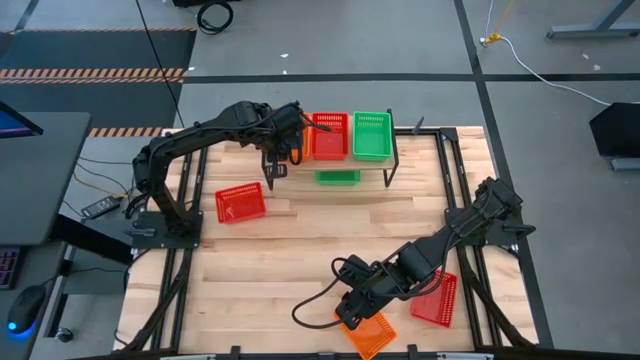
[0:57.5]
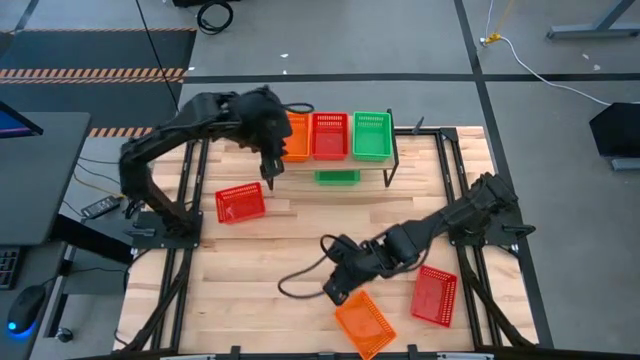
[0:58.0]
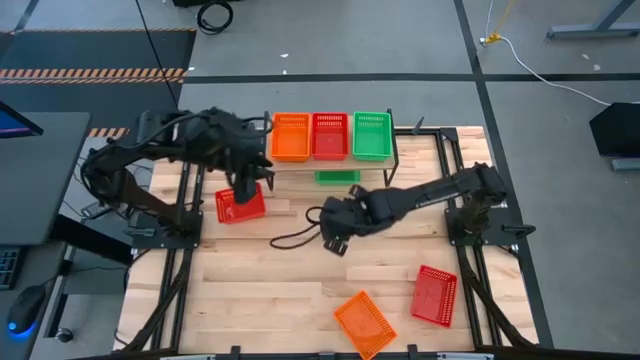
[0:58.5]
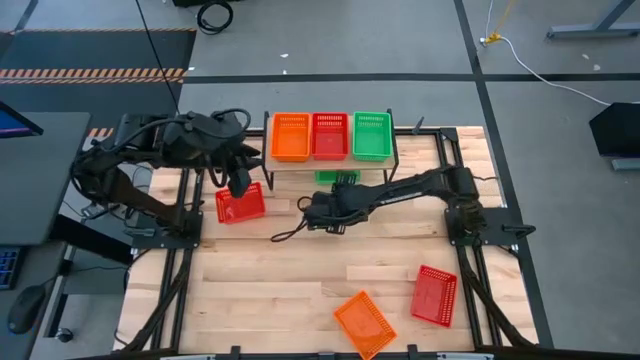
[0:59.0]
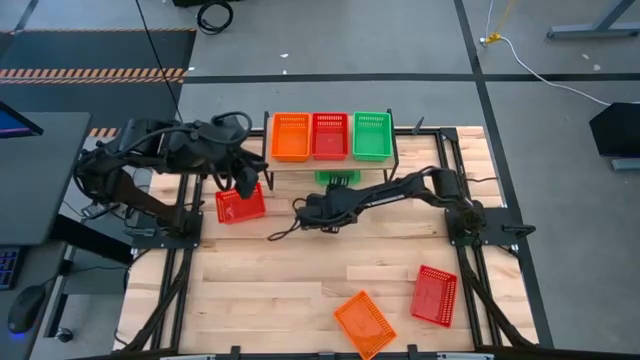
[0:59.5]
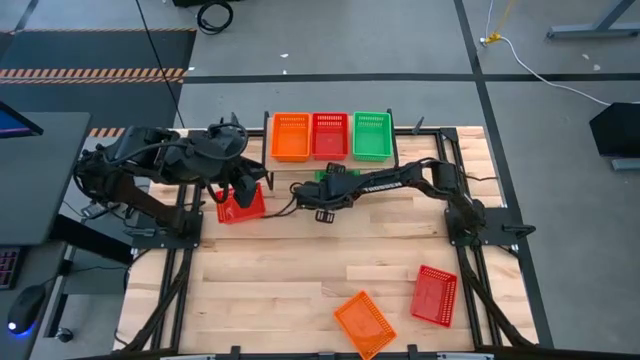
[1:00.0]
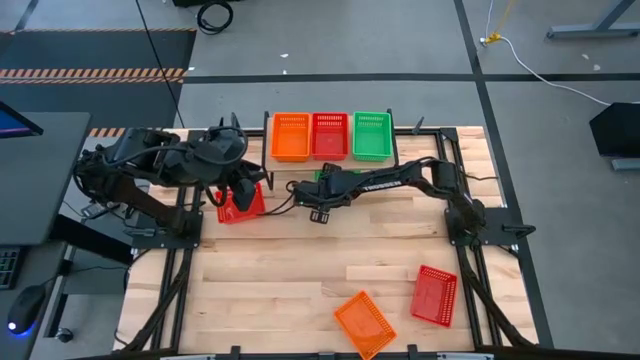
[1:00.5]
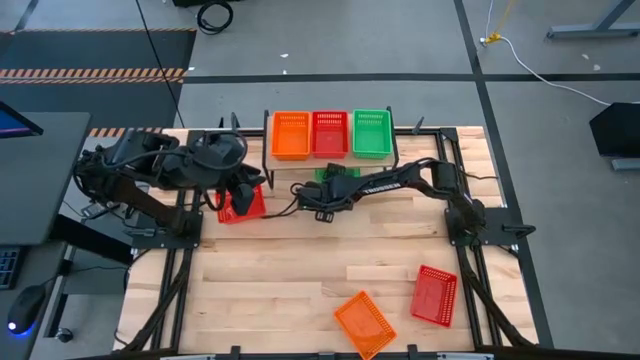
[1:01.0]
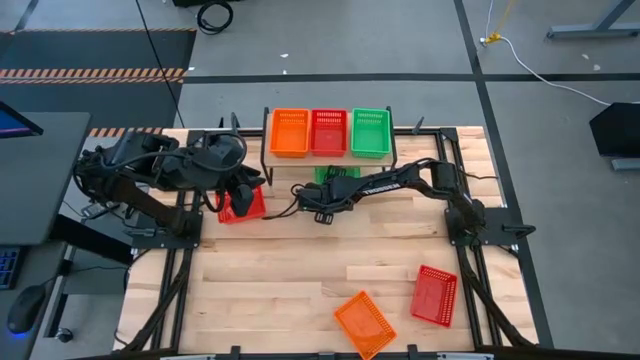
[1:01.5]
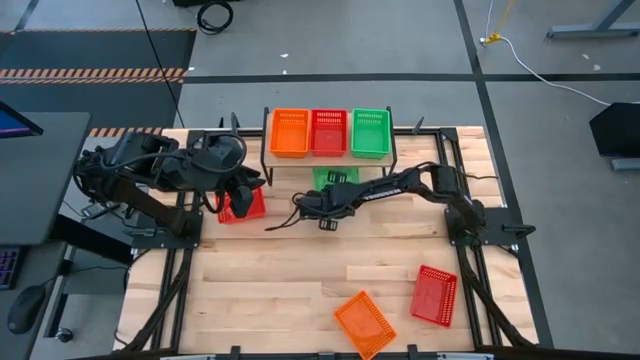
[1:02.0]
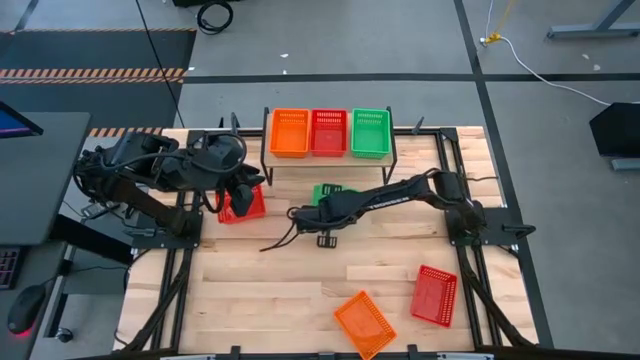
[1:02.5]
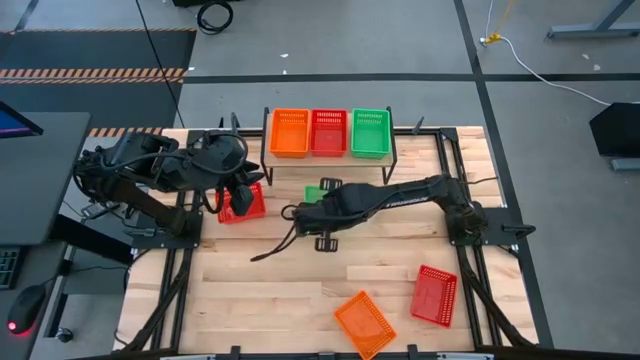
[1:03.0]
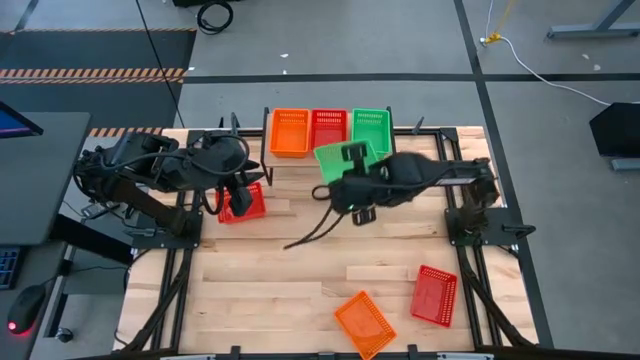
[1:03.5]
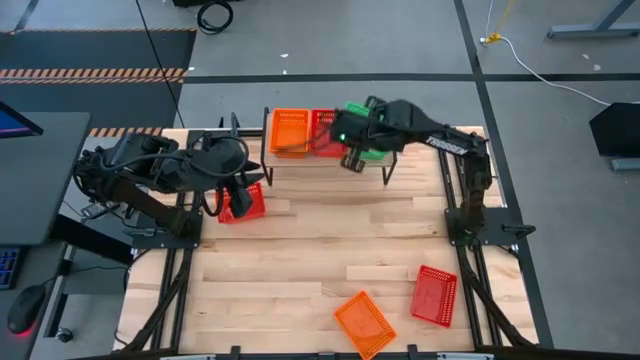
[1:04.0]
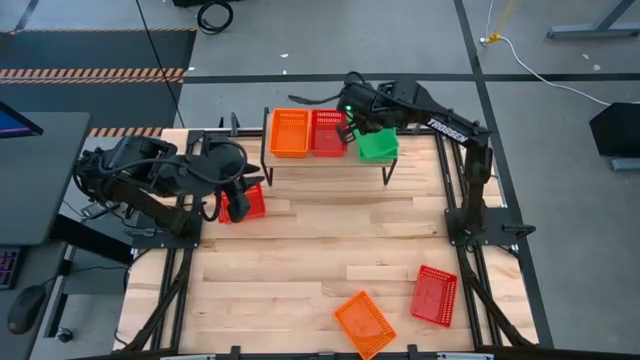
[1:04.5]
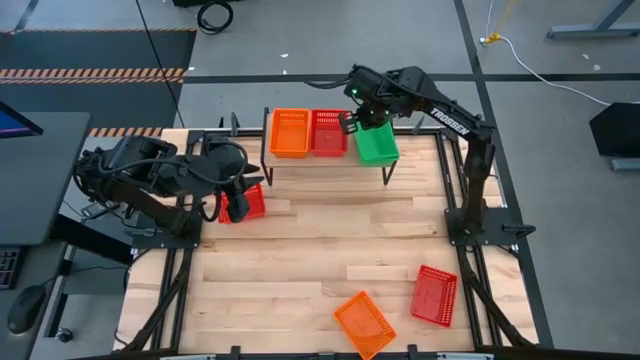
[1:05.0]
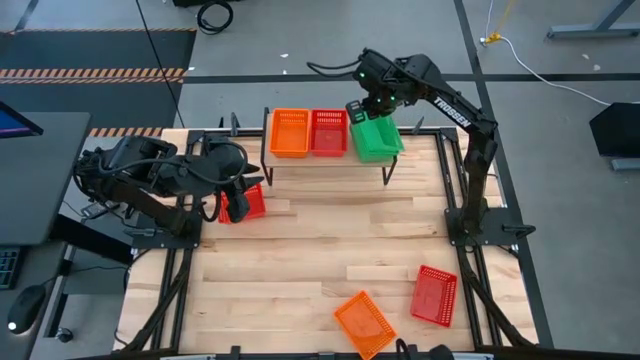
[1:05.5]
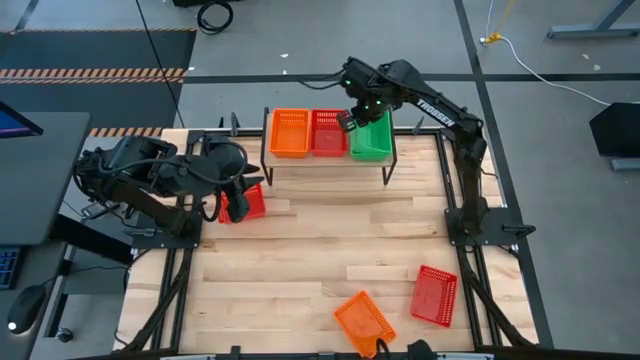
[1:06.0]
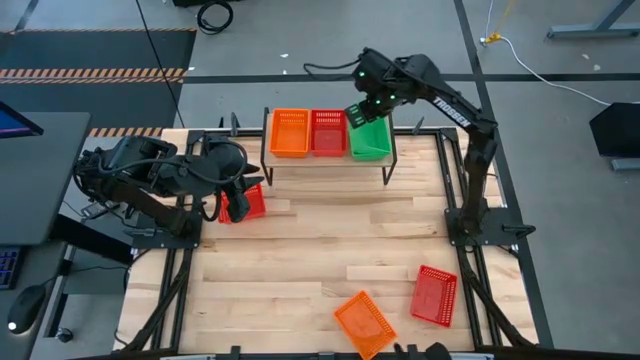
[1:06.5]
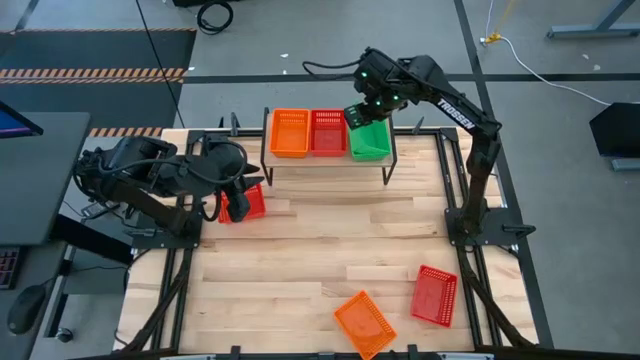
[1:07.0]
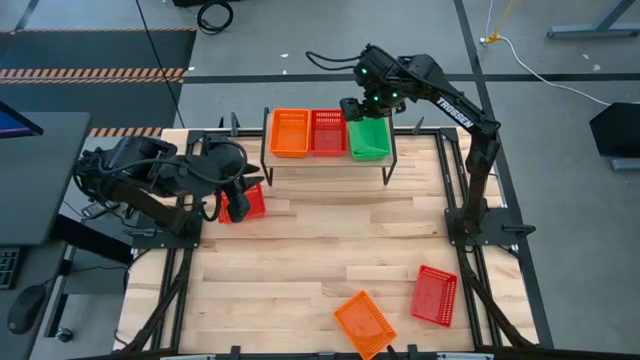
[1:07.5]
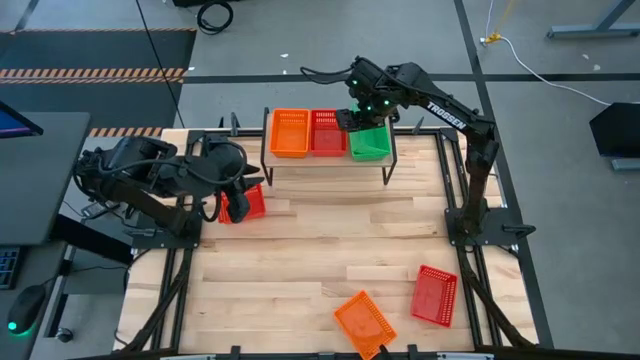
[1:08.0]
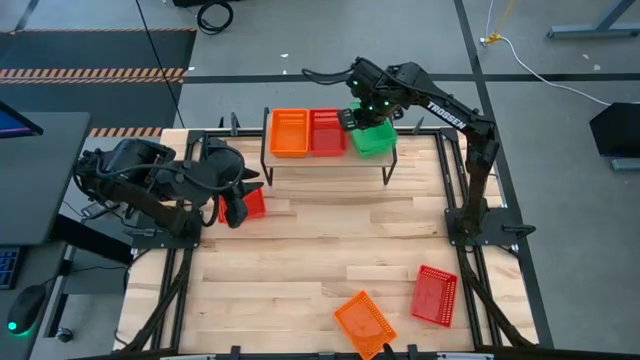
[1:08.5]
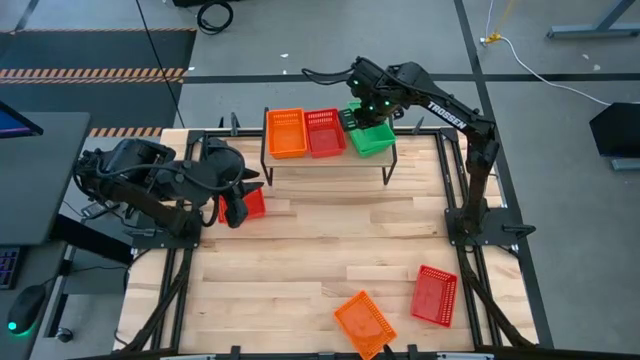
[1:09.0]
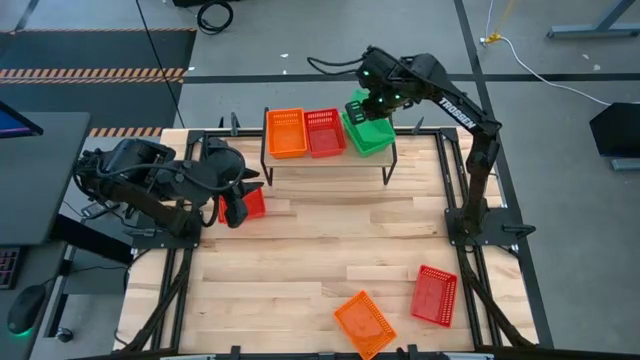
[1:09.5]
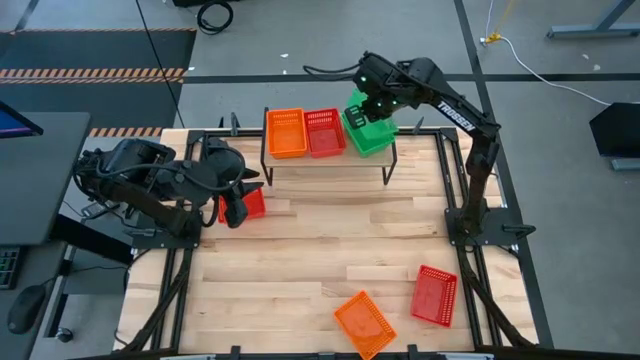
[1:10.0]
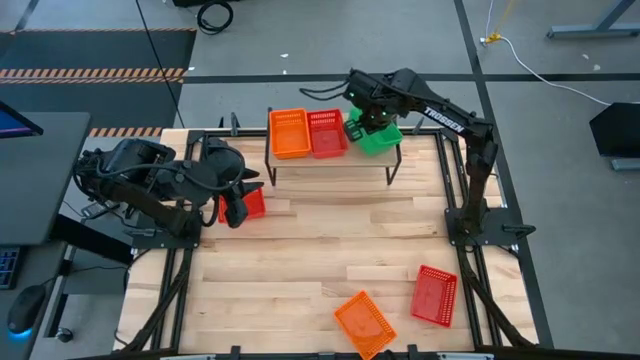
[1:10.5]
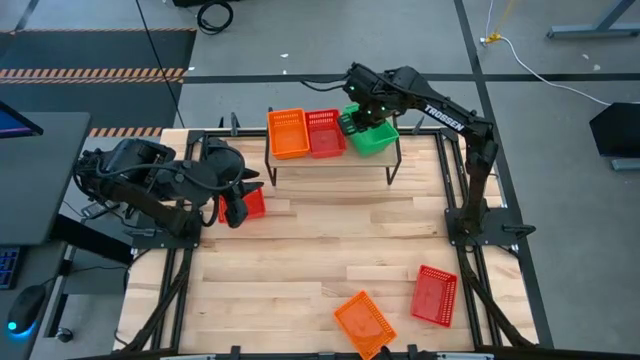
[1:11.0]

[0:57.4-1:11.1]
Task: Stack baskets on shelf by color
Stack the green bin on top of the other green bin on the shelf

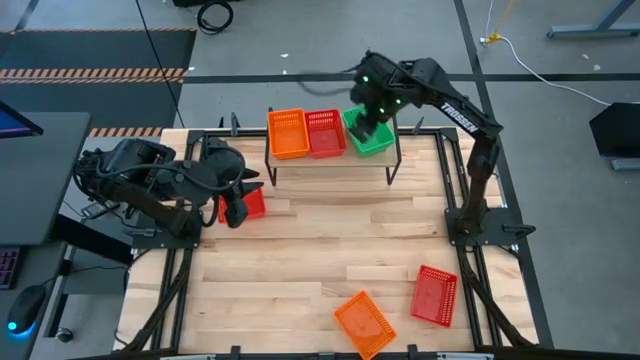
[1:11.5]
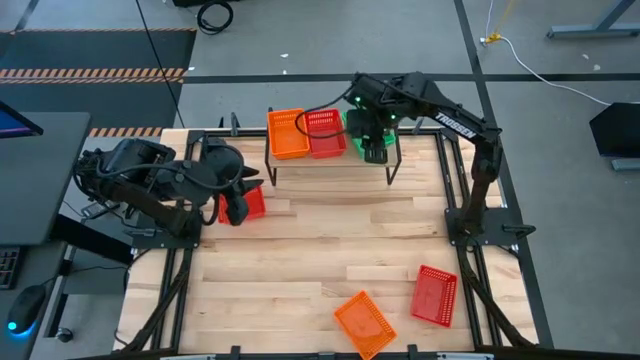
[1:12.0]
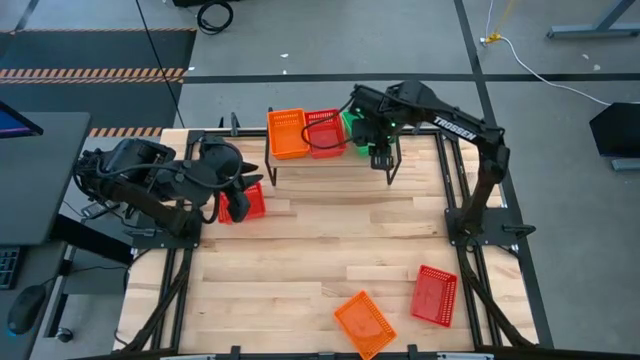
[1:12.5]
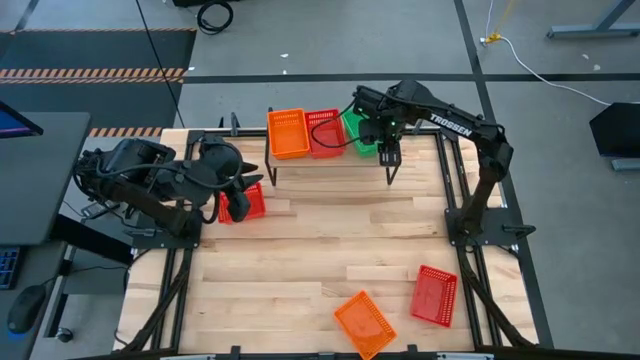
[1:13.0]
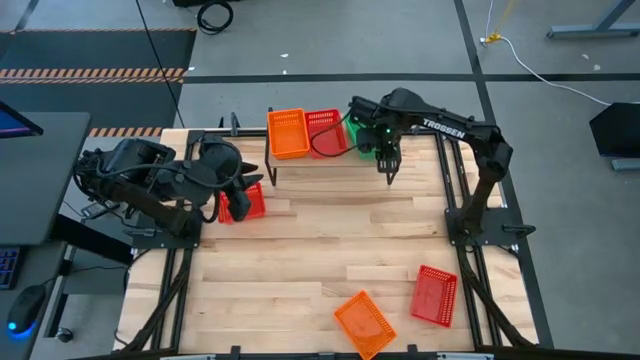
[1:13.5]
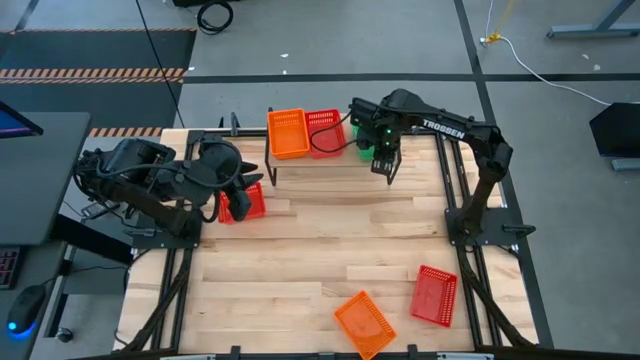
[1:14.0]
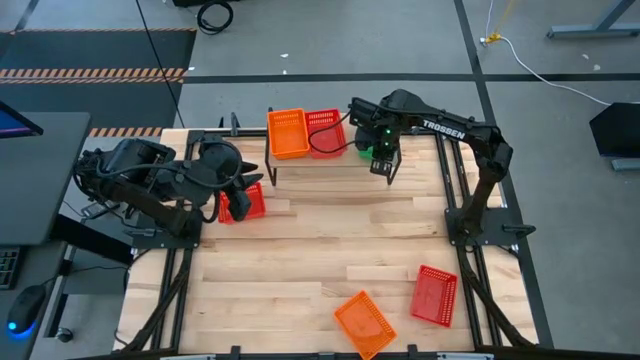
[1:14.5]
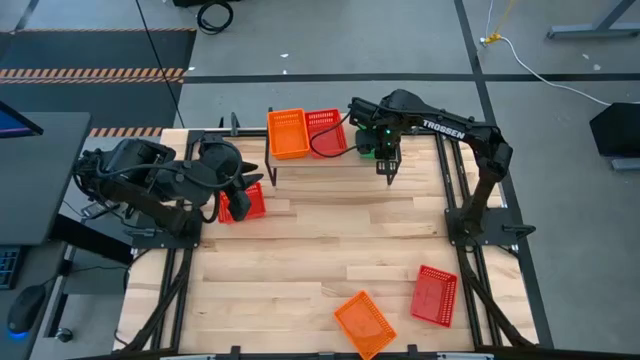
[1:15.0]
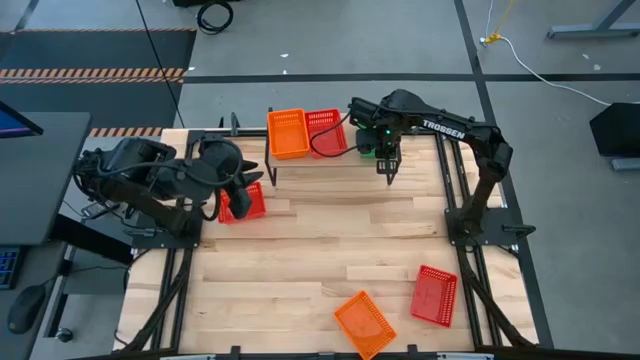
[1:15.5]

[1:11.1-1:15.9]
Adjust the stacked green bins on the shelf

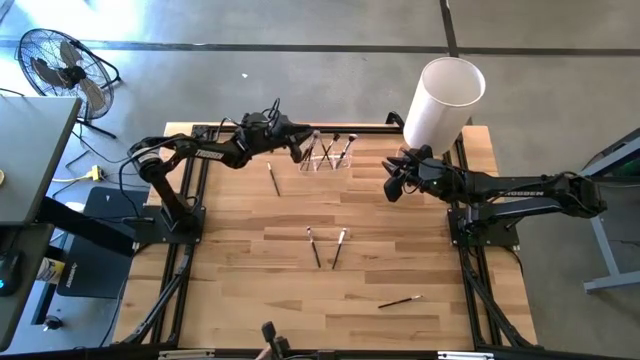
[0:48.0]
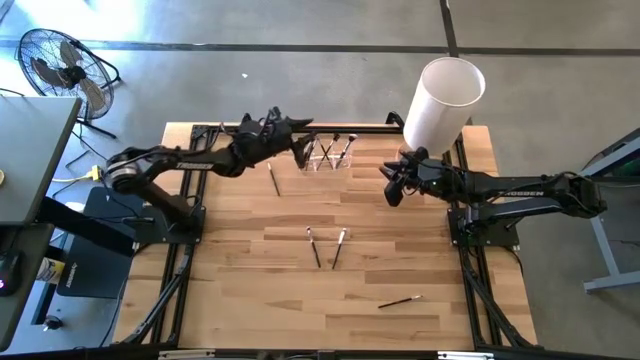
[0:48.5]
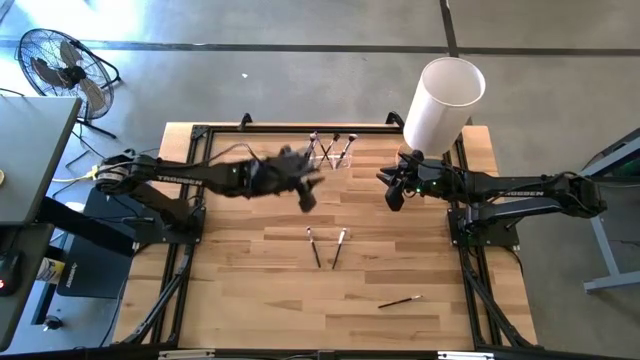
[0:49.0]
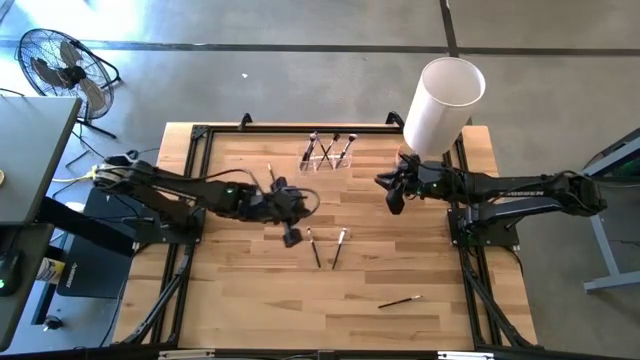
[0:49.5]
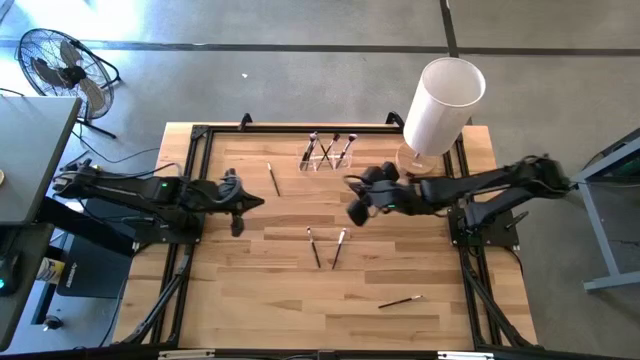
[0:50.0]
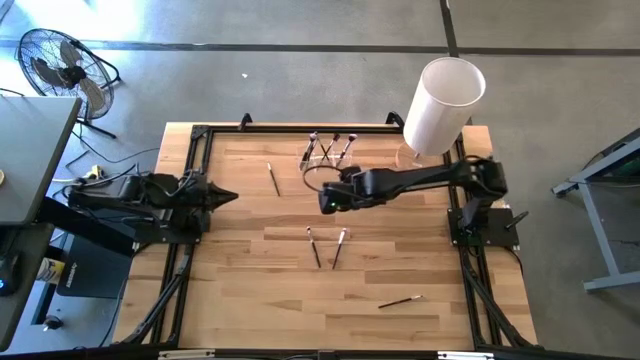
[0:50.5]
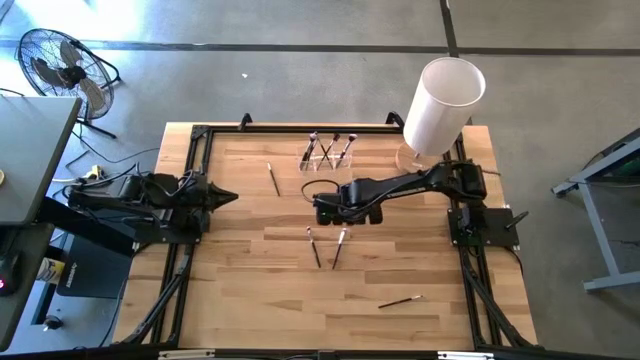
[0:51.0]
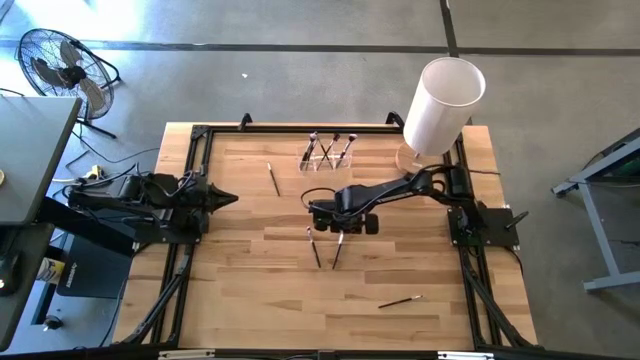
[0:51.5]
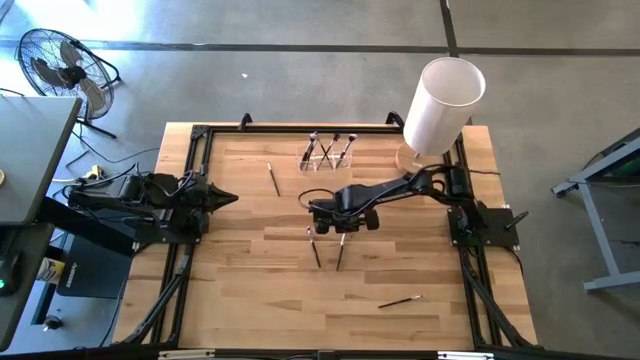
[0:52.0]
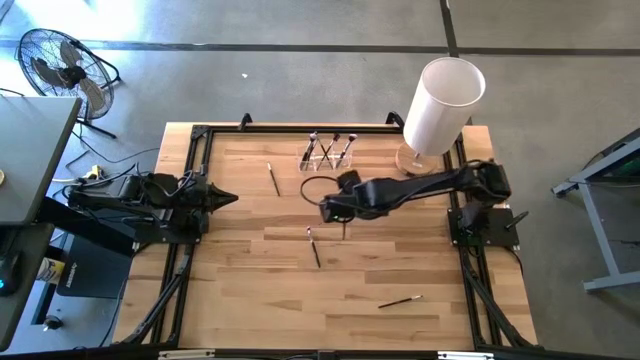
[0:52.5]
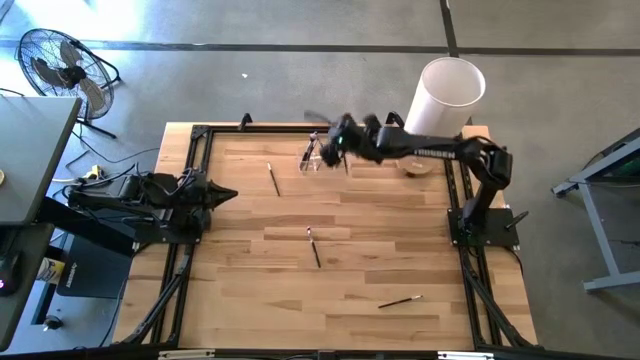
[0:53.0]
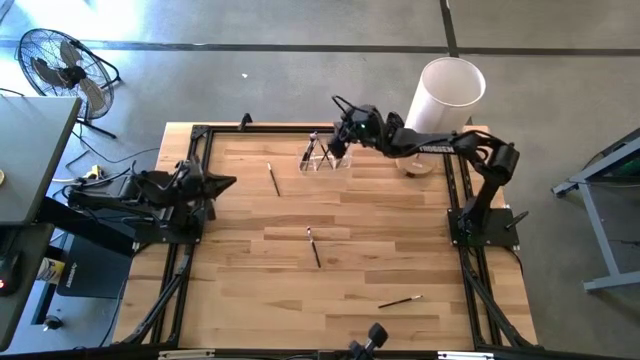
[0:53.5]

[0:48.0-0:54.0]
Task: Pick & Place Makeup Brushes
Put the black eyeshadow brush into the transparent organizer
